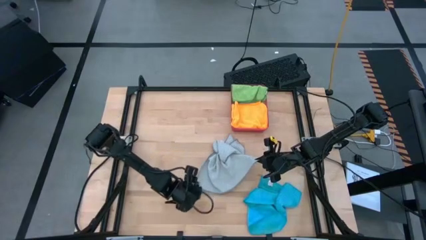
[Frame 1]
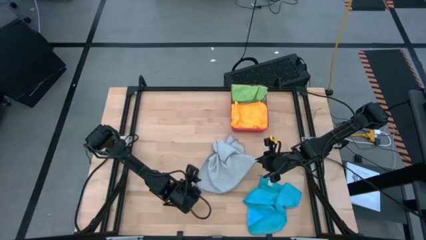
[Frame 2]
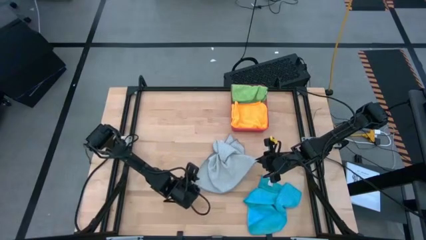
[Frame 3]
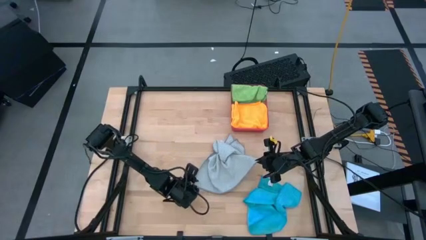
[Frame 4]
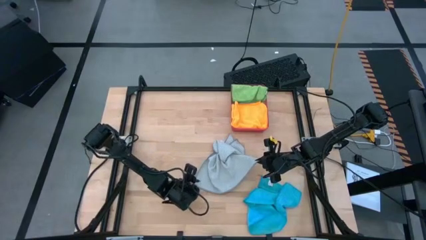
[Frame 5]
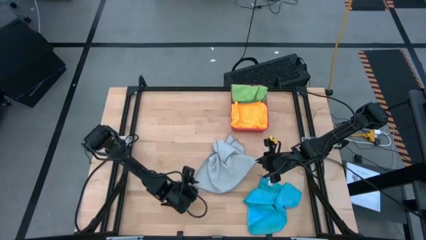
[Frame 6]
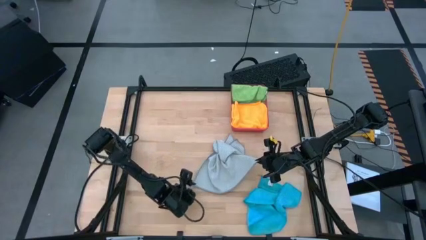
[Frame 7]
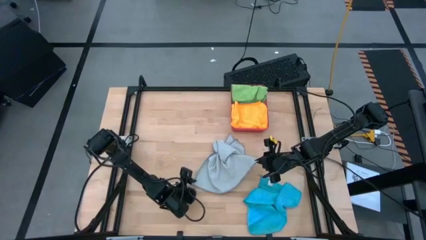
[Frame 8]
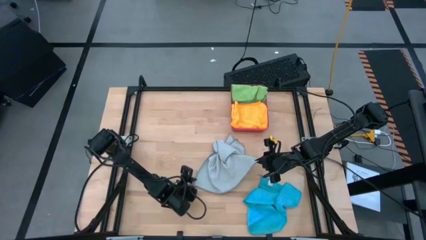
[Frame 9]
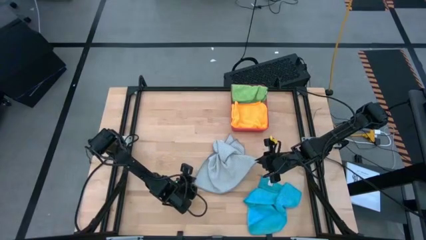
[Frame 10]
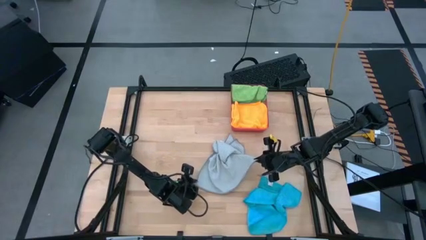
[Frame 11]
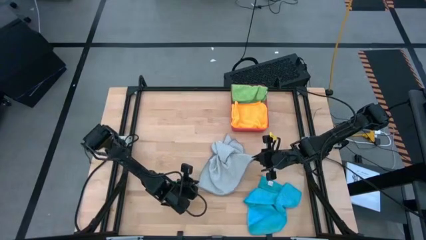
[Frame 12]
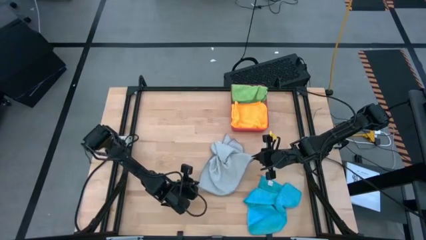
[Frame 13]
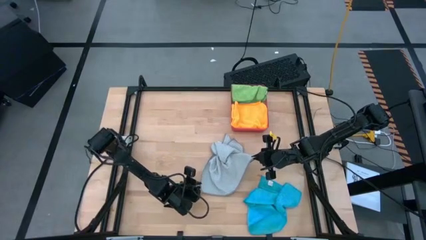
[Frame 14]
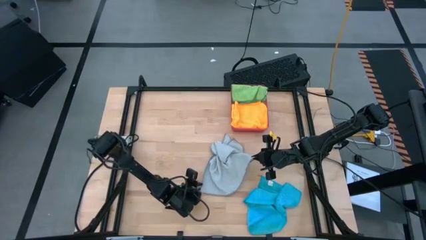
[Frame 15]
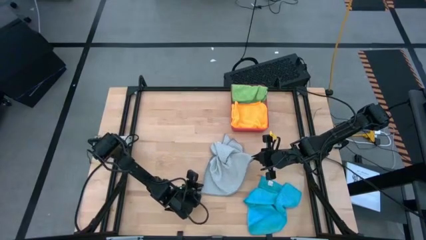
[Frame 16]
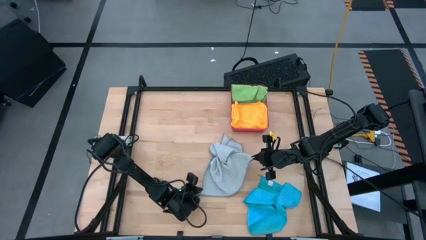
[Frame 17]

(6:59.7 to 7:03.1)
Task: Fold microfiber towels
Fold the gray microfiber cloth

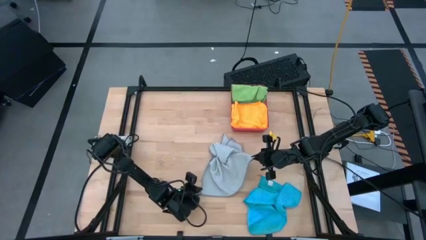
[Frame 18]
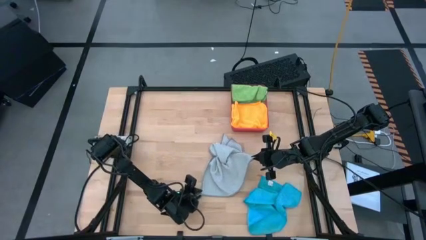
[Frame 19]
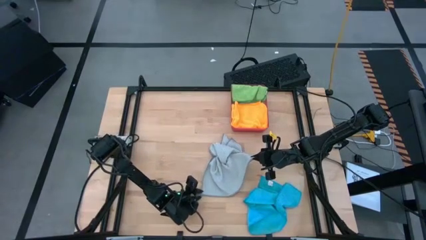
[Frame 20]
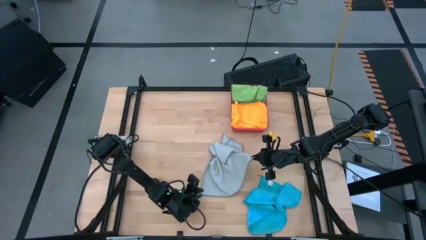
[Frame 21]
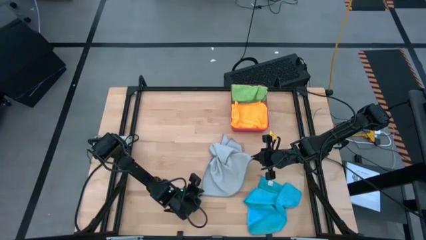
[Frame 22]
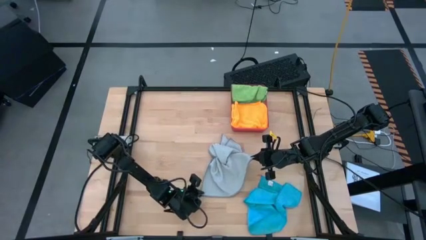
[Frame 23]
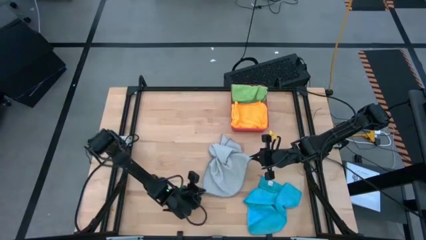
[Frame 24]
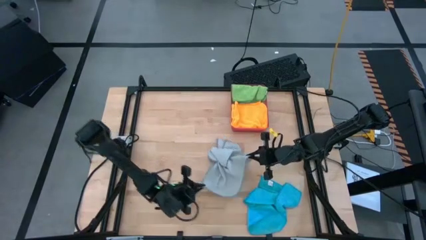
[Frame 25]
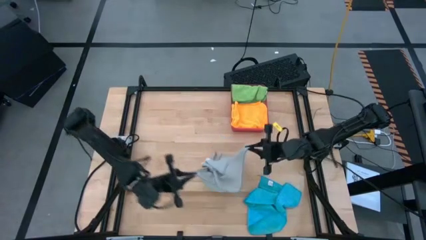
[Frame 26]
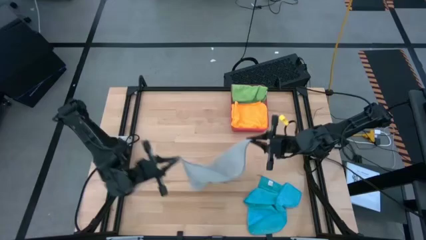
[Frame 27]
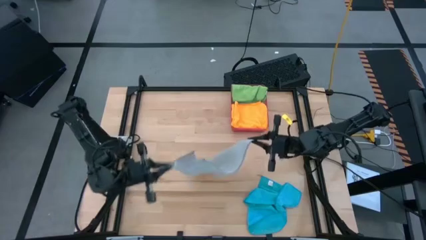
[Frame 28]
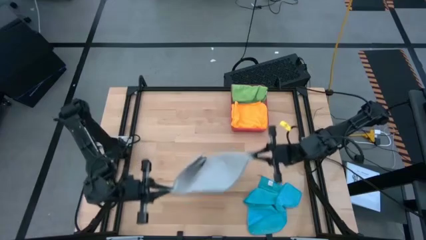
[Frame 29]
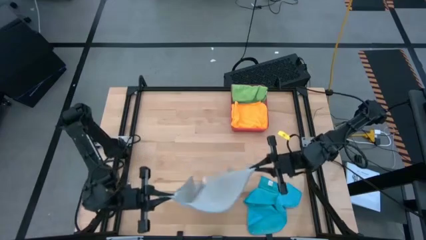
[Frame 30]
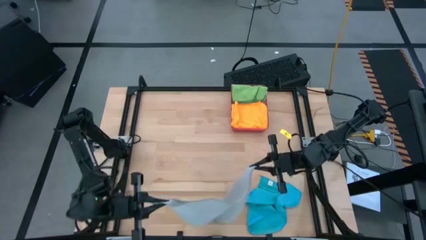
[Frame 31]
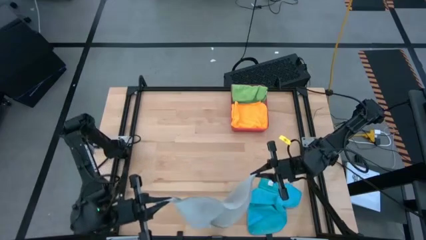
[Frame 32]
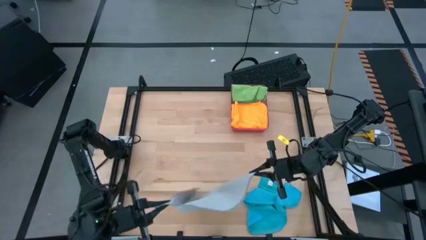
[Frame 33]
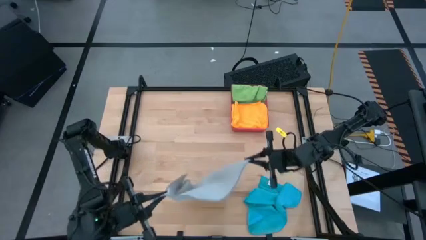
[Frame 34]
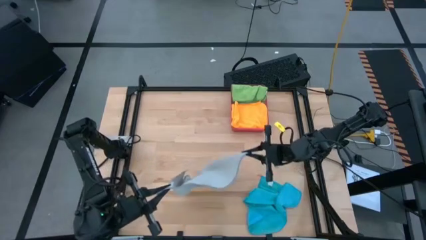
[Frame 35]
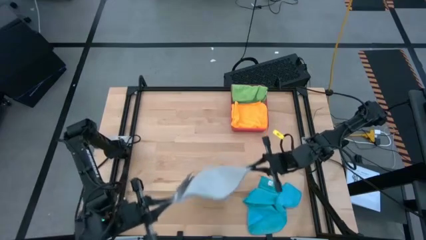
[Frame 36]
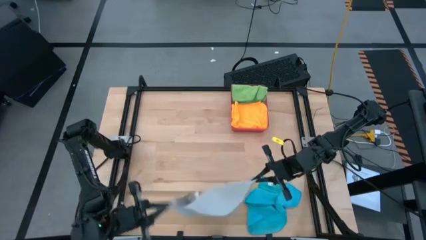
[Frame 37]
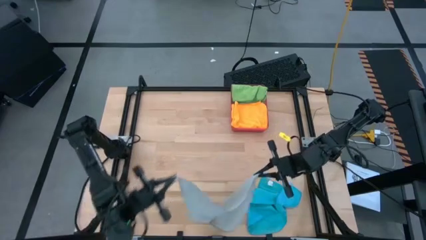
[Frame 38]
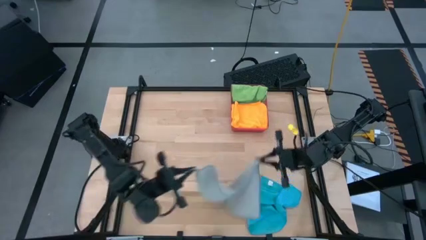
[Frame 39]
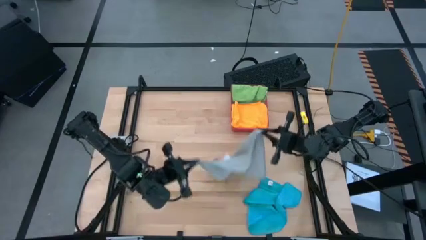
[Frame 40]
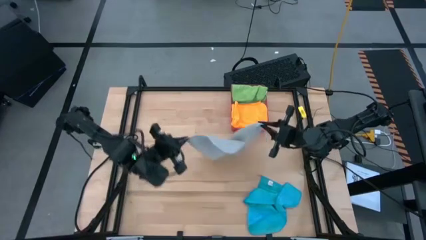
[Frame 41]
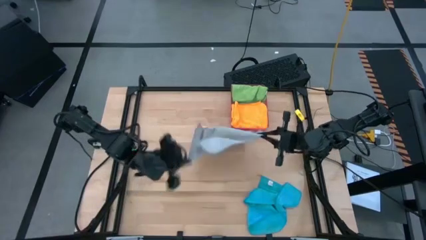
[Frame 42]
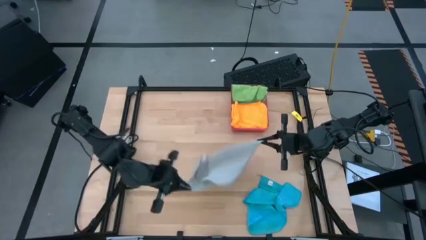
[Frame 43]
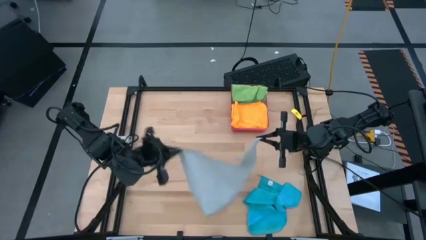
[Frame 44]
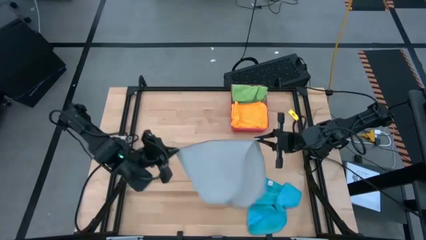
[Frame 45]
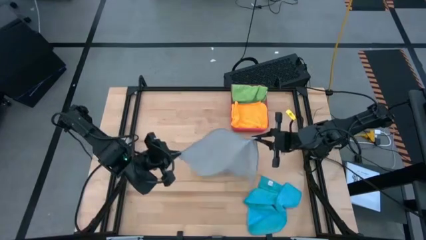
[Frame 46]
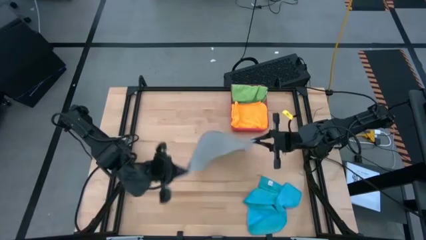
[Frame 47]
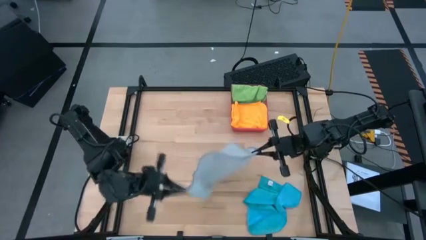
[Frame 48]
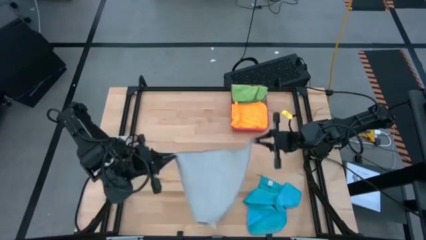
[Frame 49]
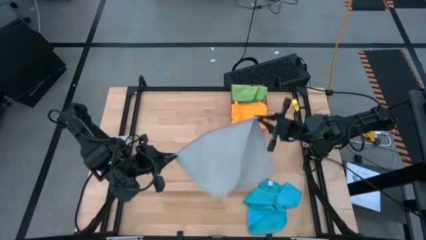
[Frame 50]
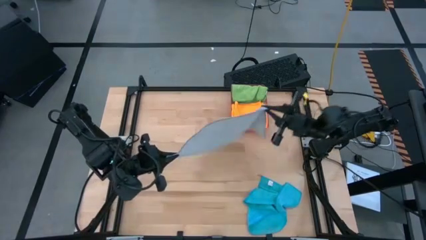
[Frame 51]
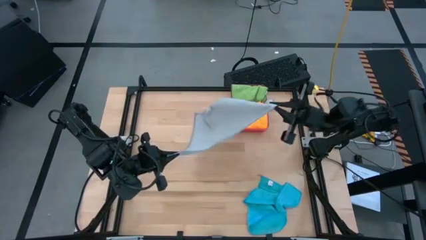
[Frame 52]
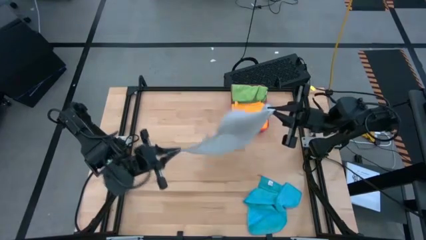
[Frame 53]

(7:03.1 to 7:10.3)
Fold the gray microfiber cloth

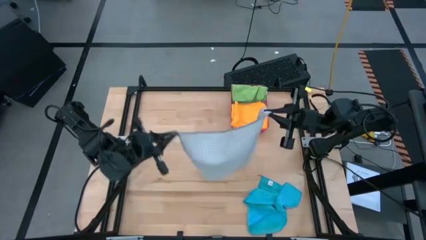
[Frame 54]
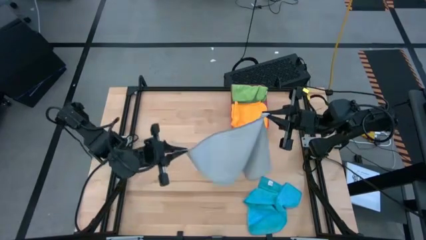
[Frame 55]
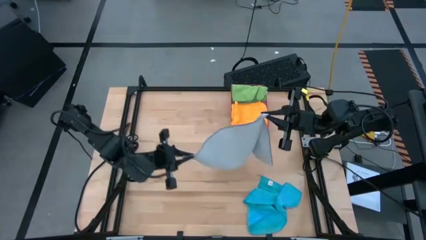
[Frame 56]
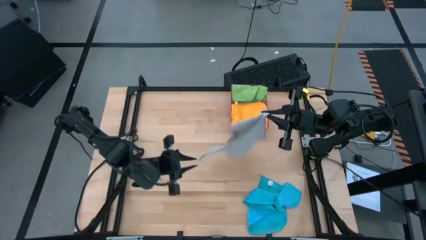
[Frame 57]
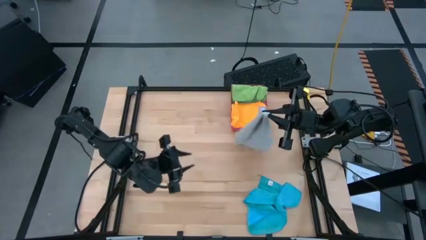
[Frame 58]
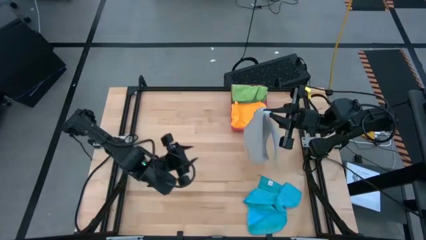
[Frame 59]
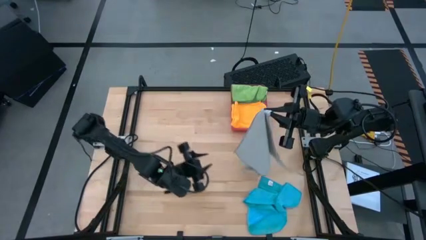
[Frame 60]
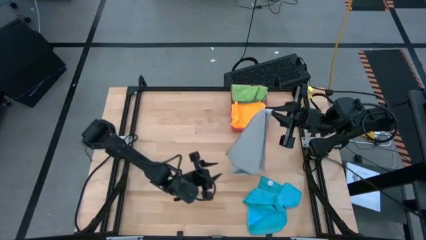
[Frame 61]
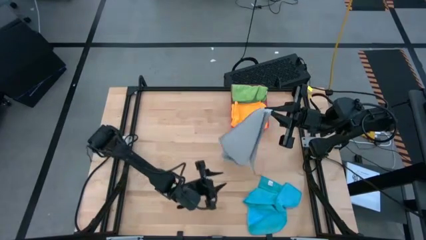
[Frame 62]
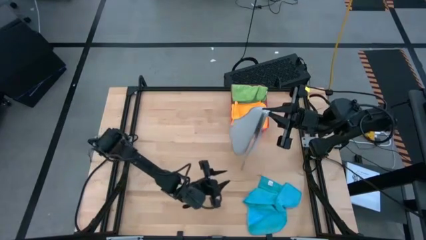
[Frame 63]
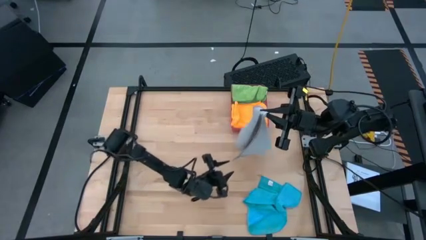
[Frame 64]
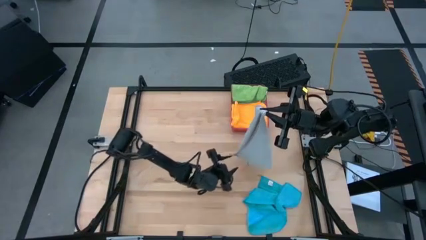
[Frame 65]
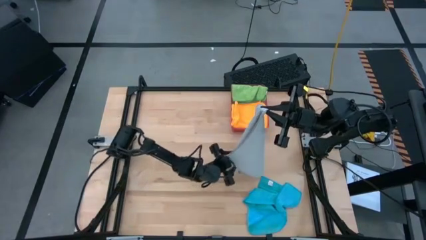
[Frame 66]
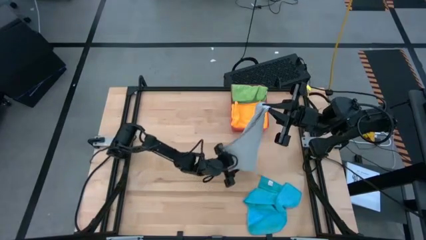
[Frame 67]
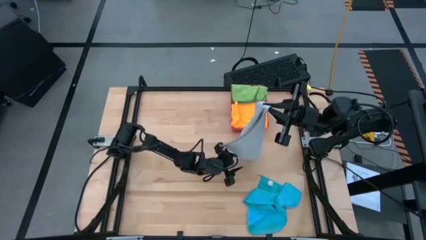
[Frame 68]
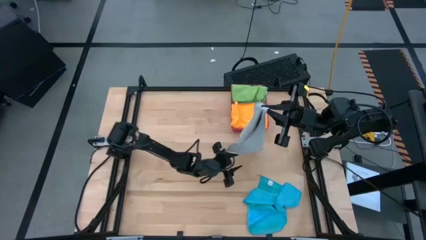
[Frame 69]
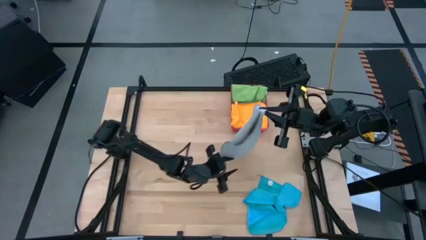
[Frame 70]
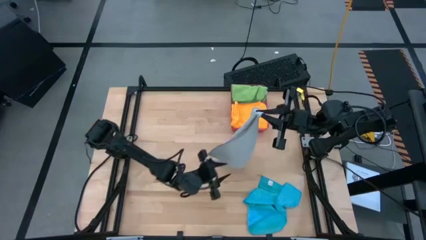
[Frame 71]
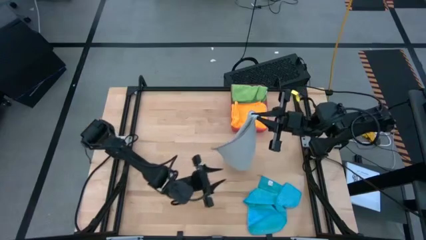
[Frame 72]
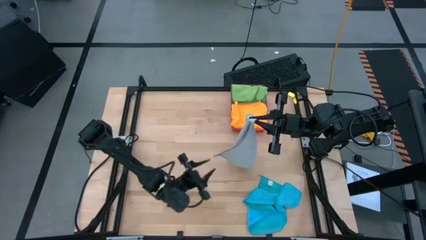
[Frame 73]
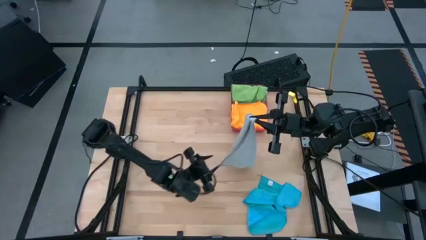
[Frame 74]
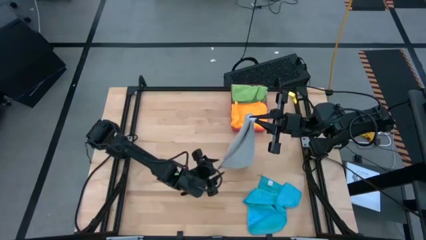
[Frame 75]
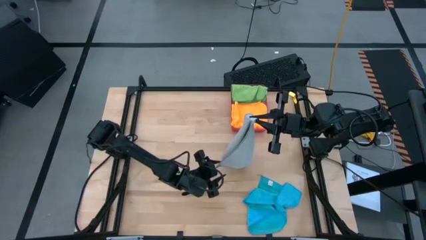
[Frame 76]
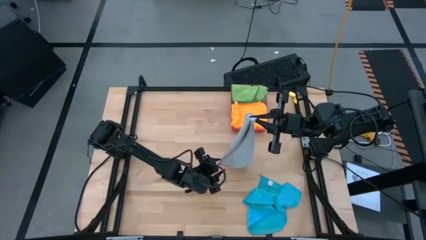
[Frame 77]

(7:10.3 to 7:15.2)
Fold the gray microfiber cloth
